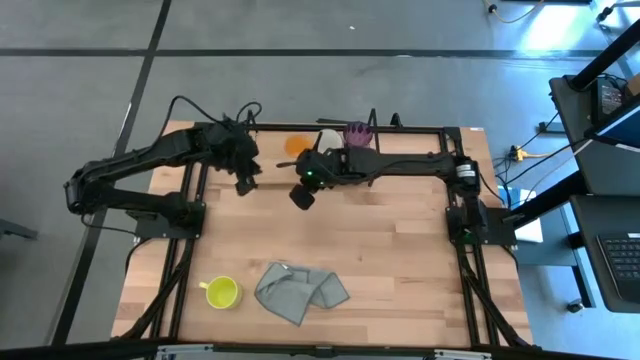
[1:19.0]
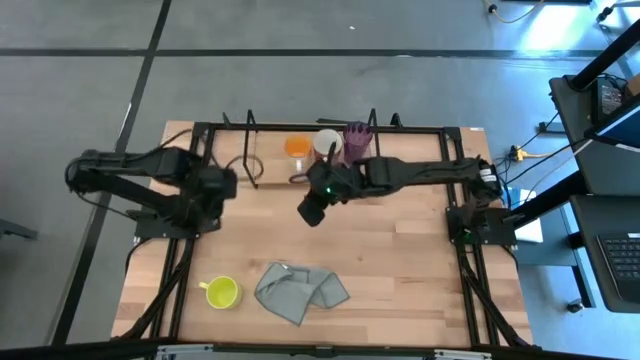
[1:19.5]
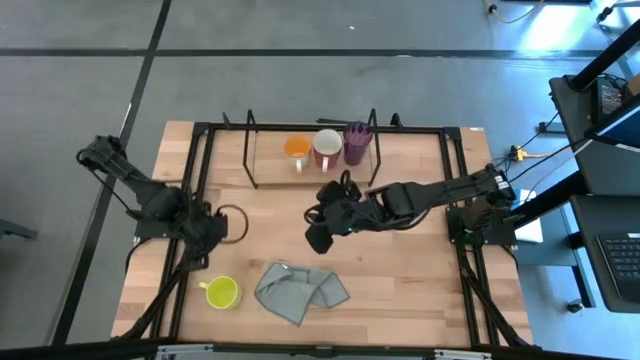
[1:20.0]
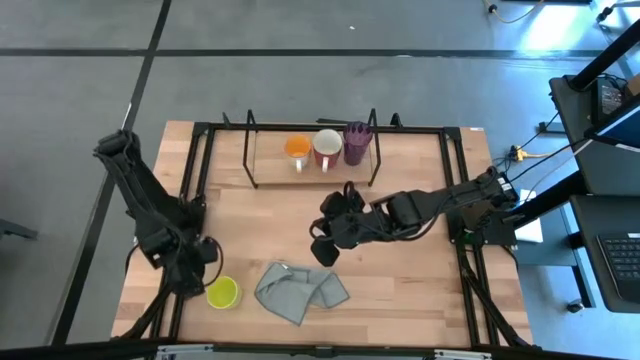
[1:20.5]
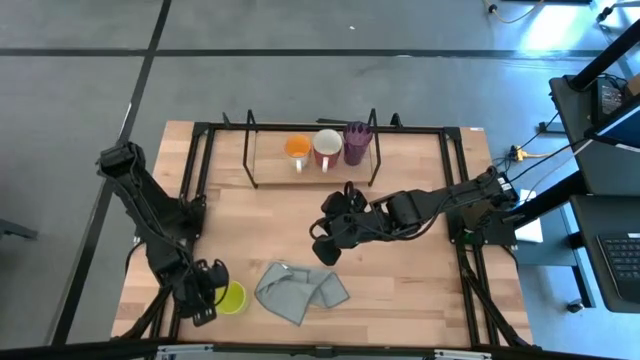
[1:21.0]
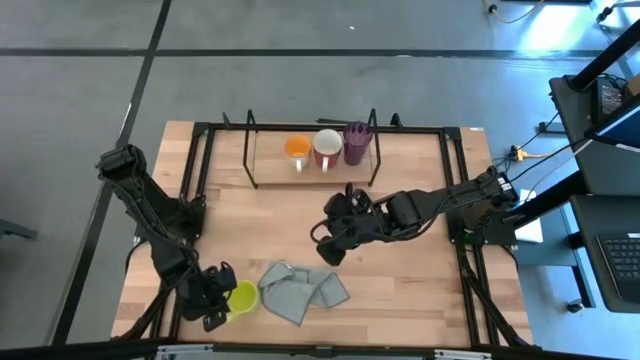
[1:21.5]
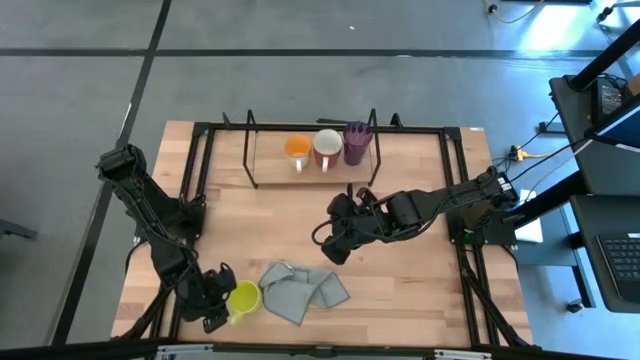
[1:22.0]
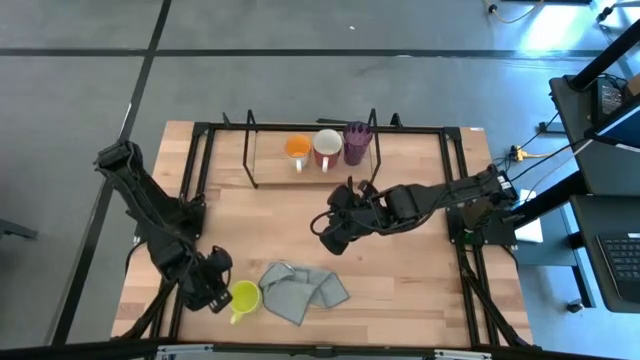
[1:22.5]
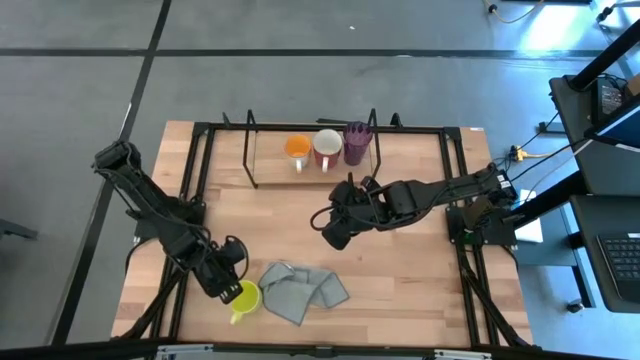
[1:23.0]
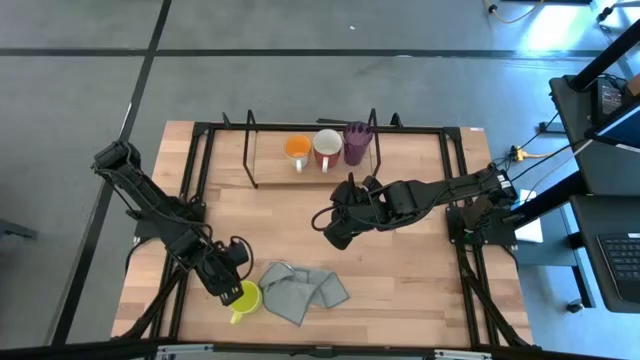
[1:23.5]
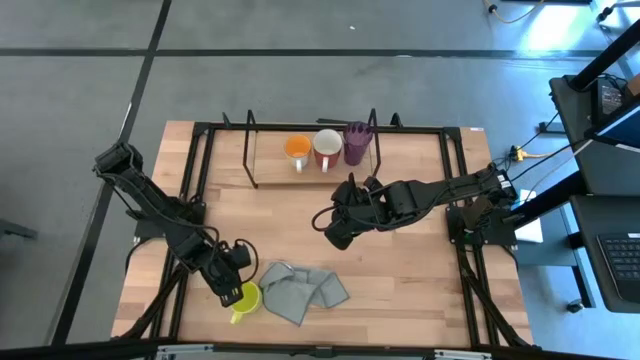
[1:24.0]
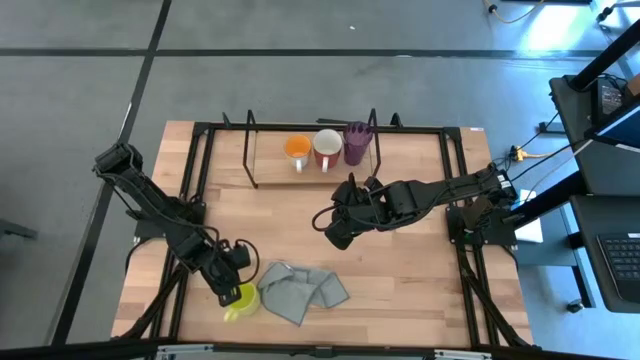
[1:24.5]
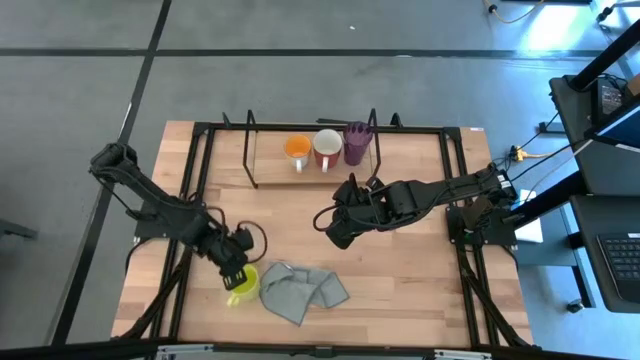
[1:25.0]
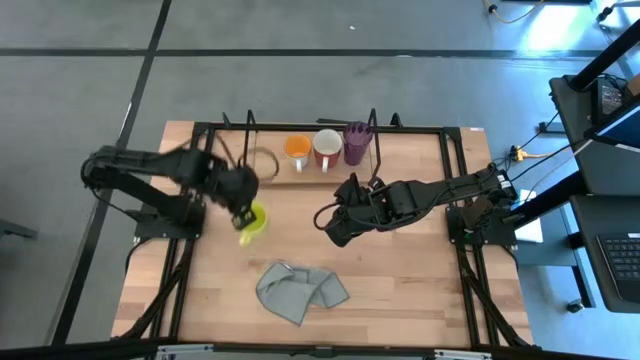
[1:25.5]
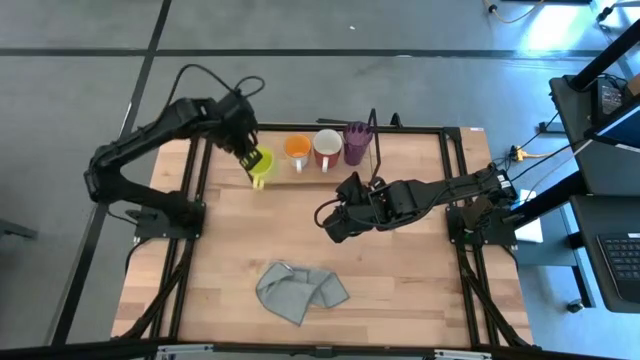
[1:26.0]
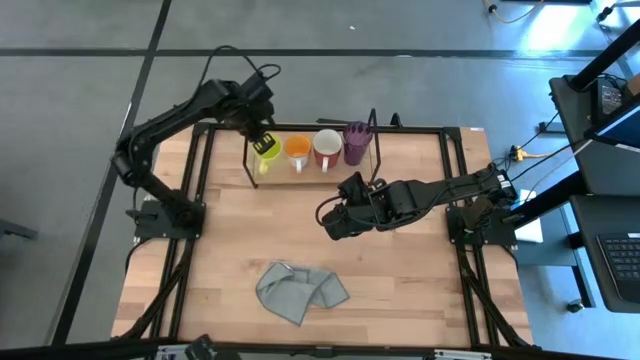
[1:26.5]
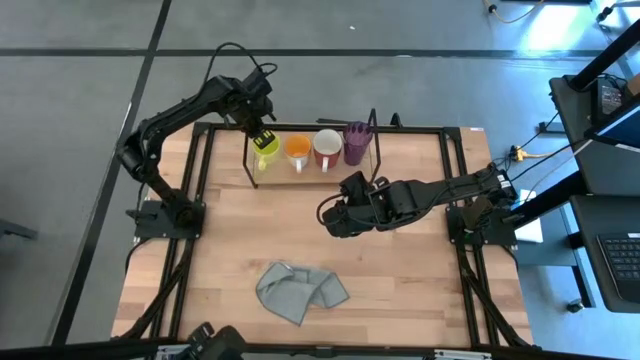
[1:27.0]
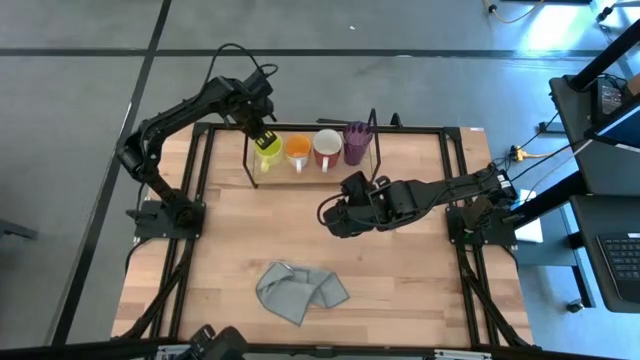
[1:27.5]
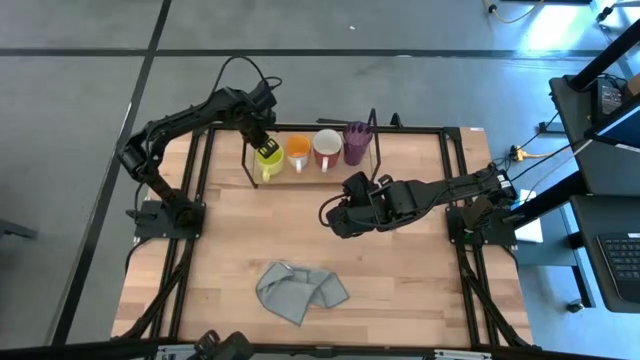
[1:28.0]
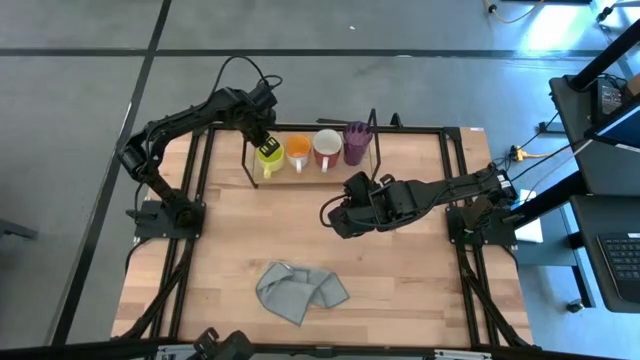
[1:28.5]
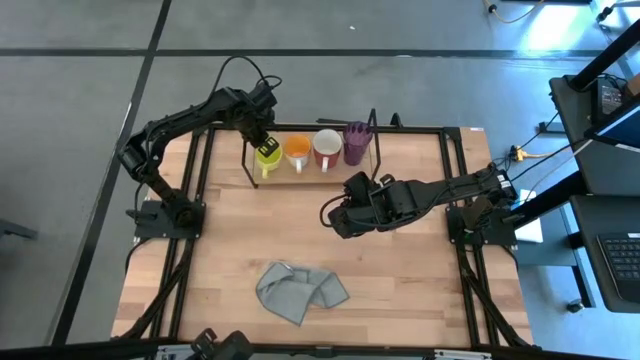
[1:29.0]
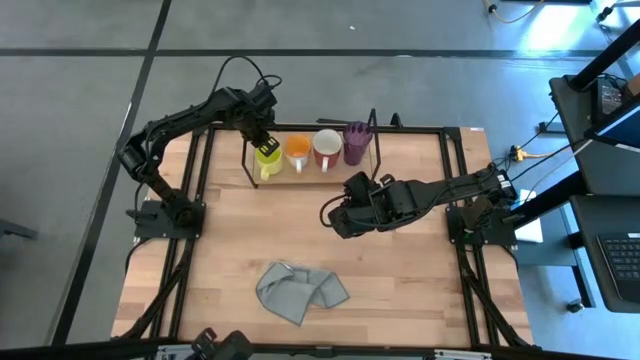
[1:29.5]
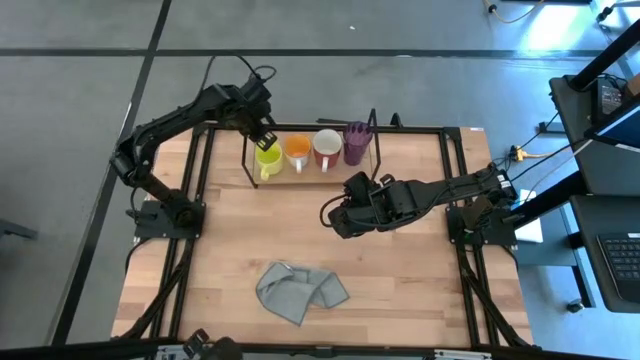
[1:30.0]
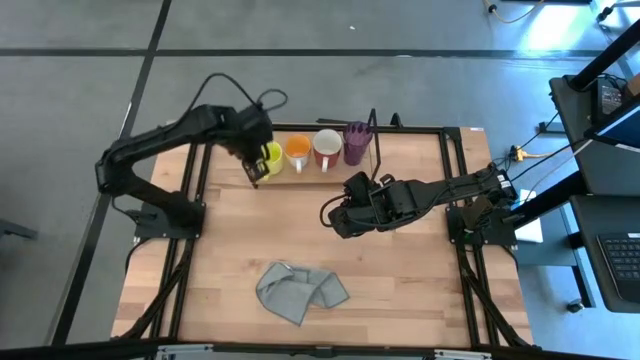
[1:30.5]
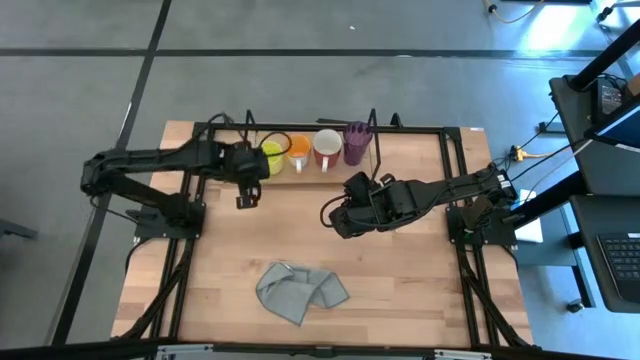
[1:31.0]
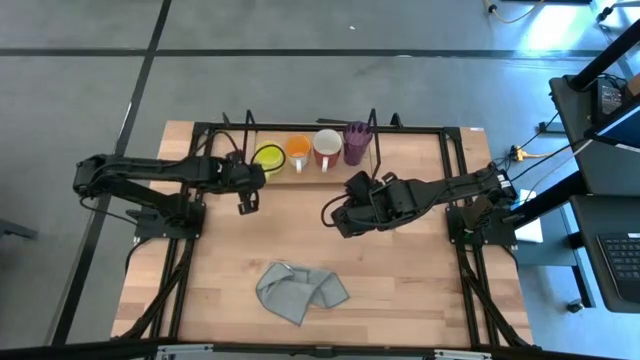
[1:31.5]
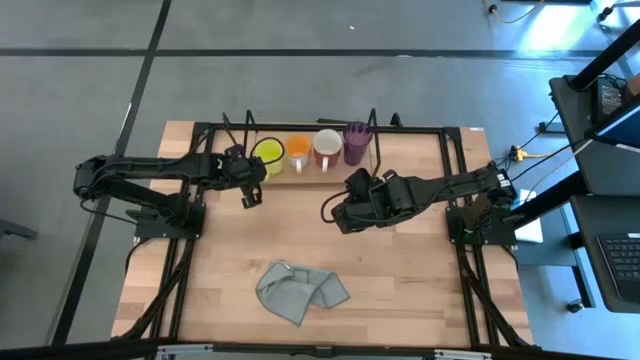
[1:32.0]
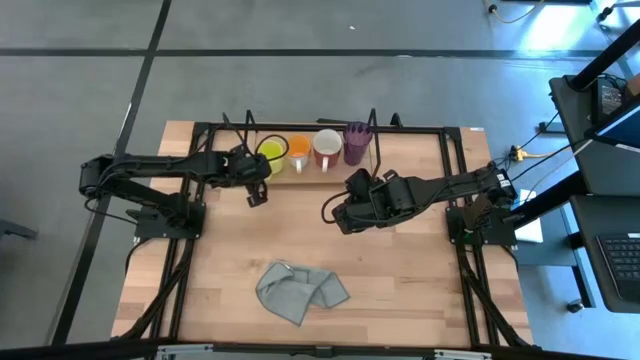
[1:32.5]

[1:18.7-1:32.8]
Task: Stack small to large cups/mugs on shelf
Put the yellow mug on the shelf

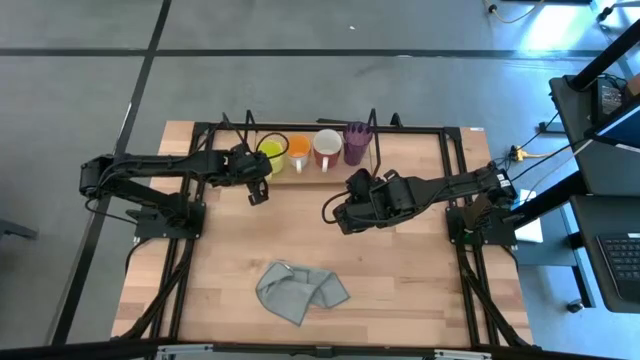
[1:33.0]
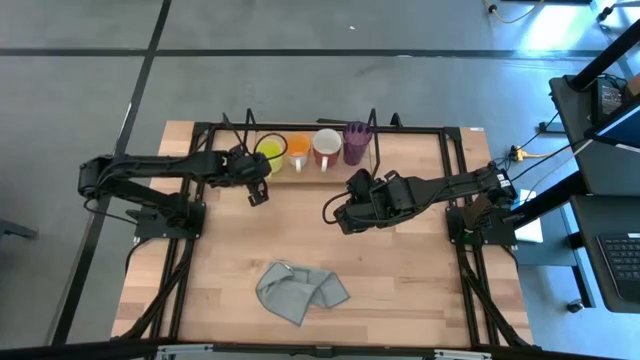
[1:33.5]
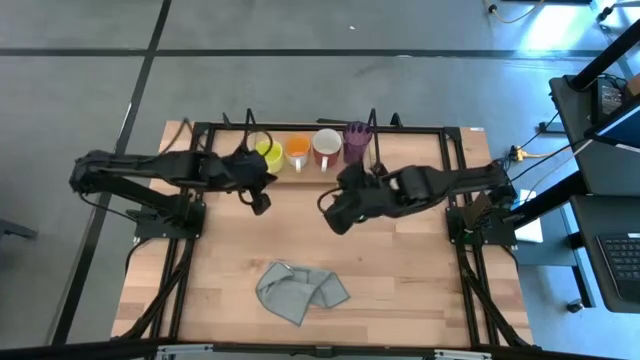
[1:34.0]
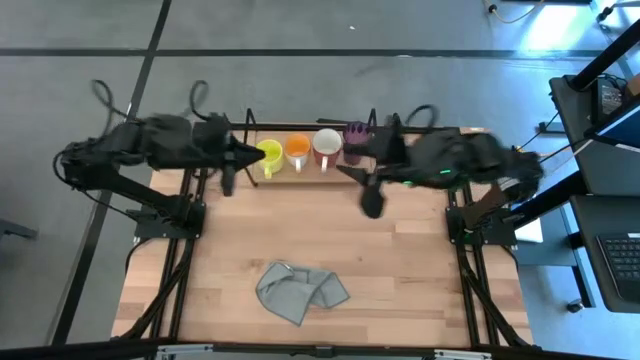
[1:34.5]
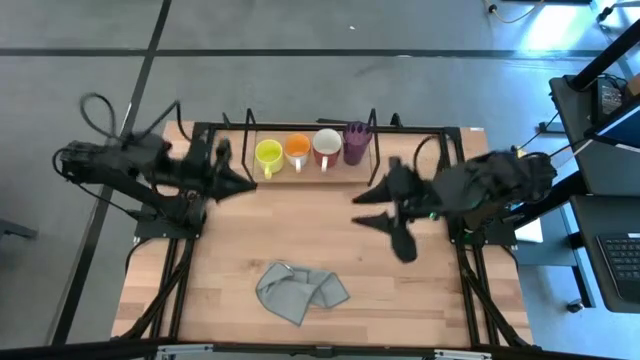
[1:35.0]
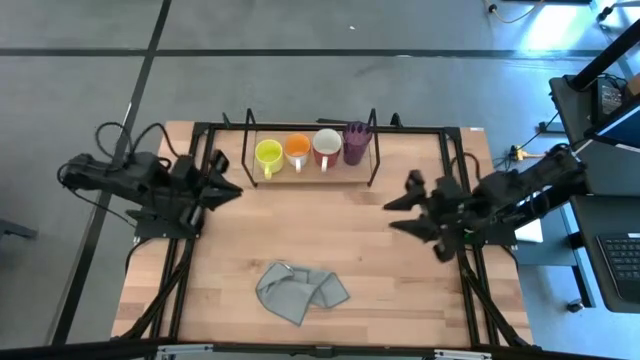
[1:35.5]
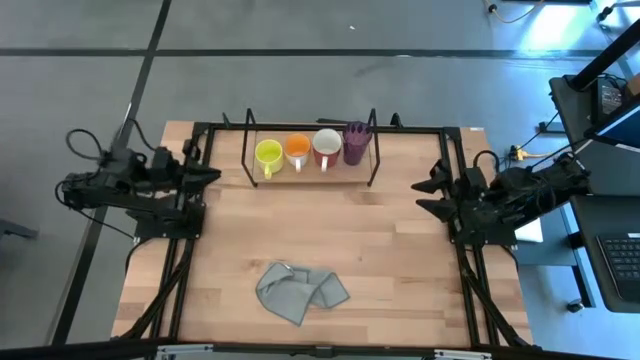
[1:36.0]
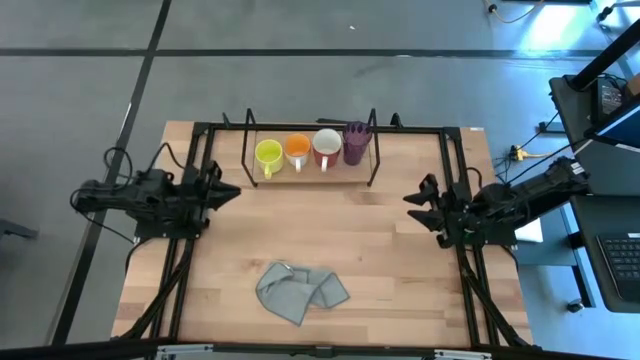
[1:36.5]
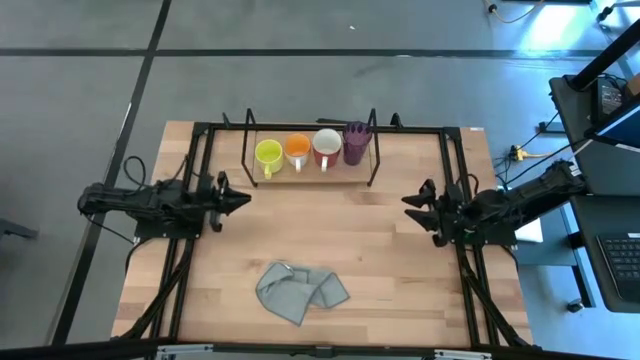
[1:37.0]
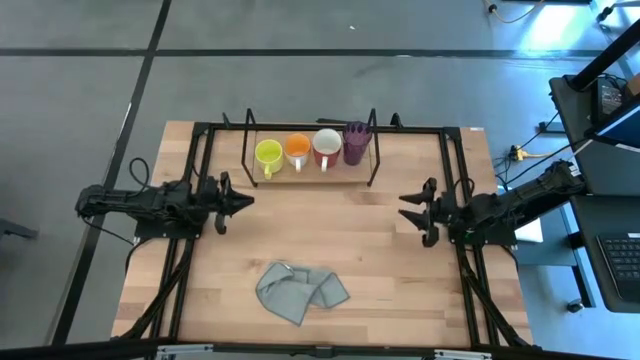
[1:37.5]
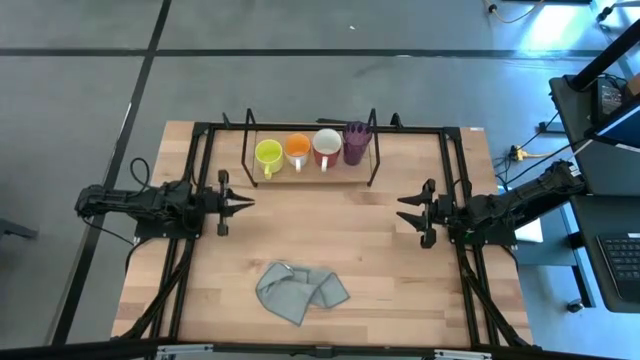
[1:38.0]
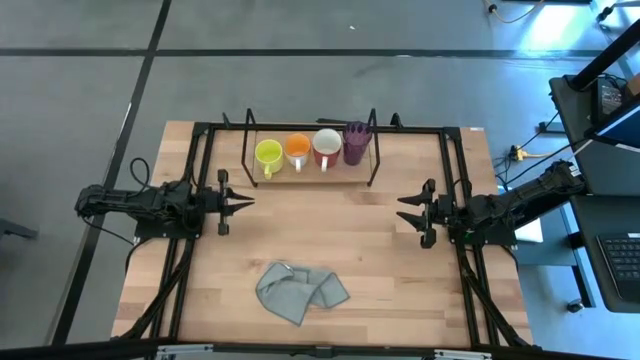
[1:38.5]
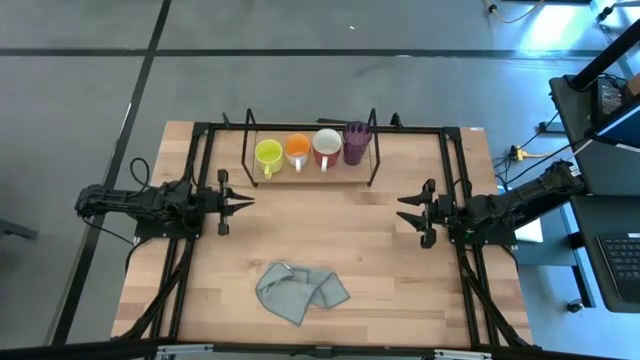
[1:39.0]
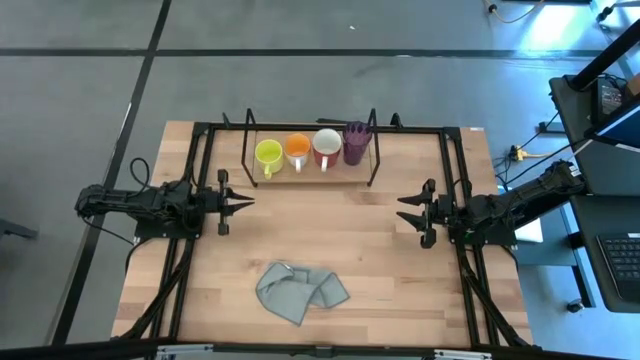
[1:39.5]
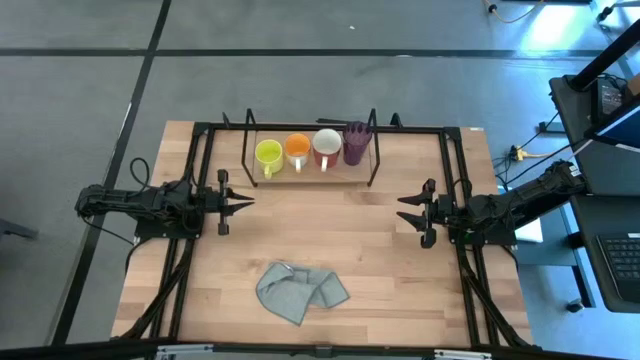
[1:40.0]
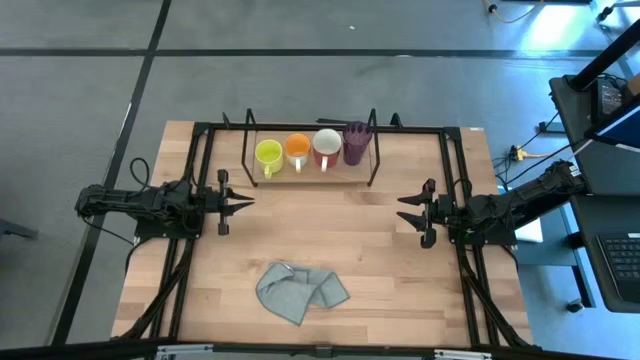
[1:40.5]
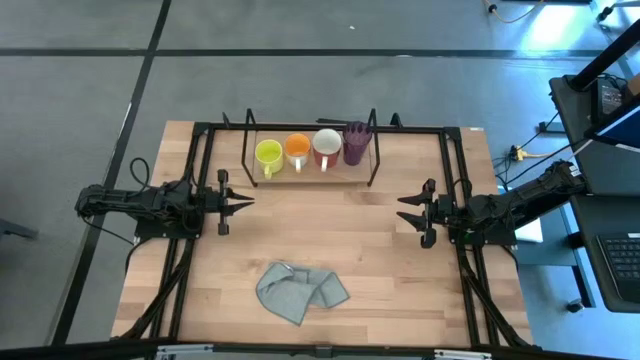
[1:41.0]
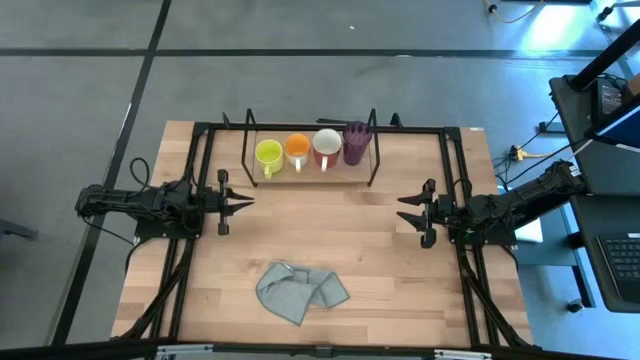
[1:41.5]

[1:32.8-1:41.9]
Return to Home Position
